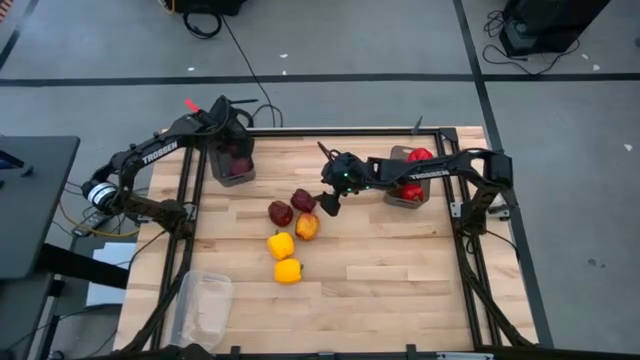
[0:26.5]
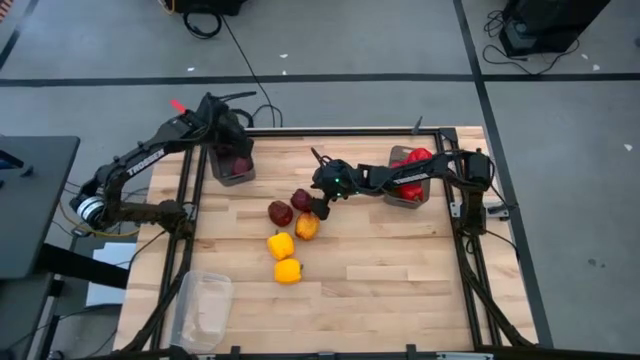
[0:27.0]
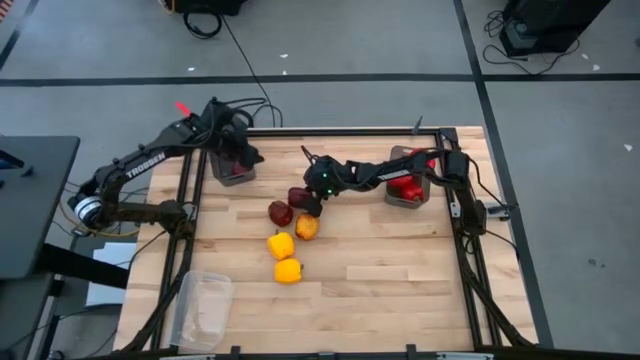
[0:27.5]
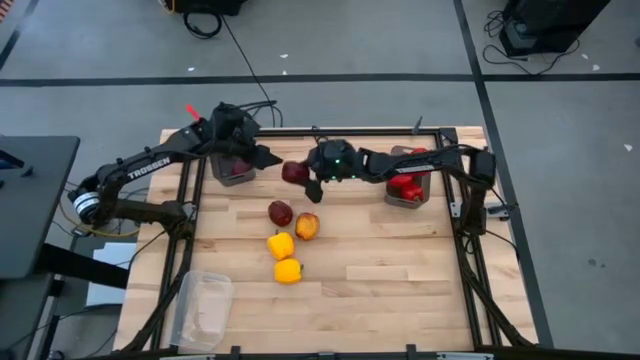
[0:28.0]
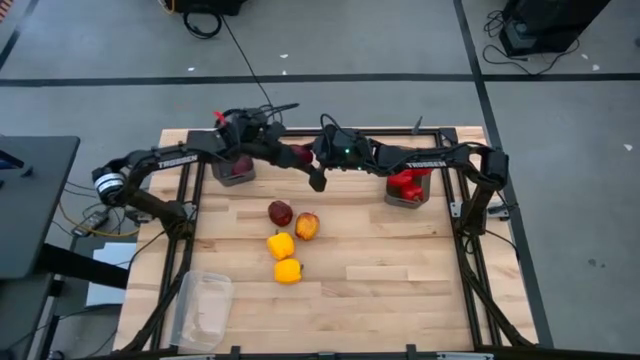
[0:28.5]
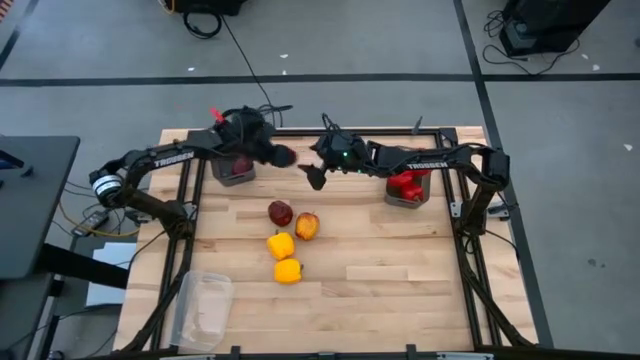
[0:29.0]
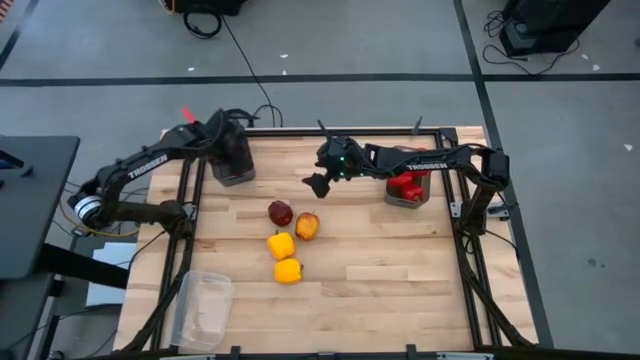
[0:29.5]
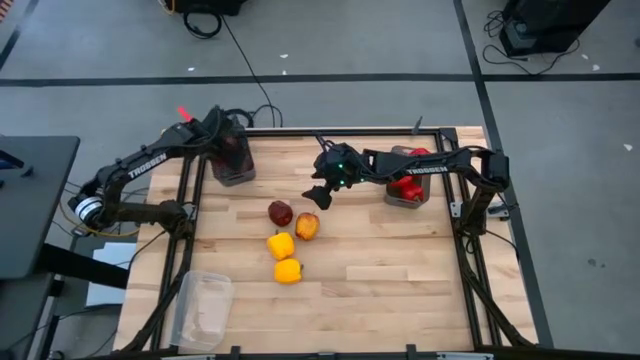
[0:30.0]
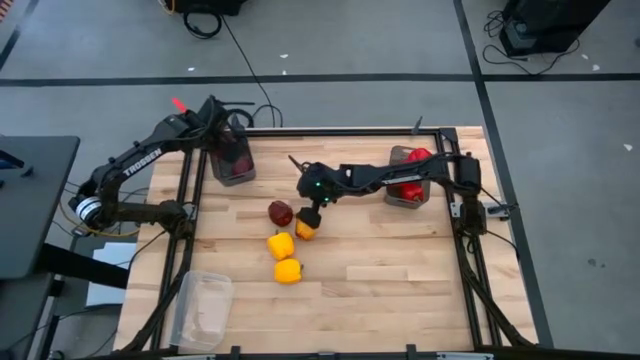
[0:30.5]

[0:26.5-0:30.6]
Task: Sort produce into baskets
Put the red apple into the left black bin

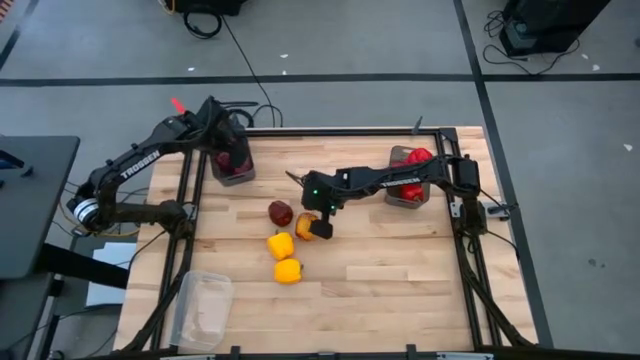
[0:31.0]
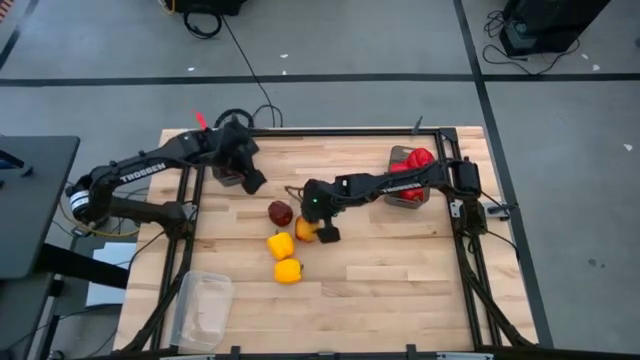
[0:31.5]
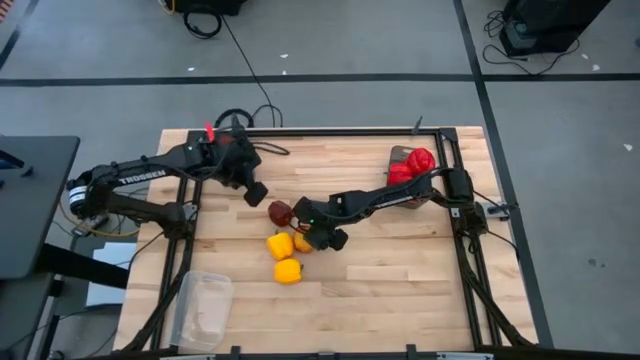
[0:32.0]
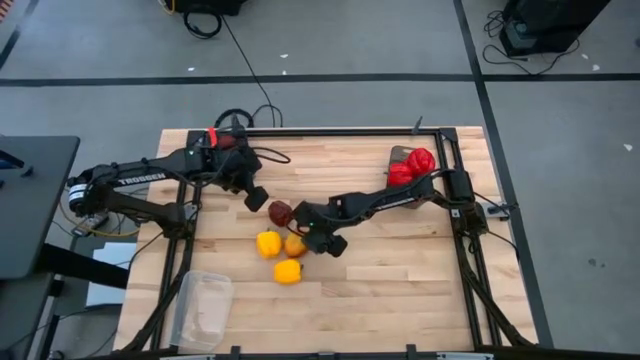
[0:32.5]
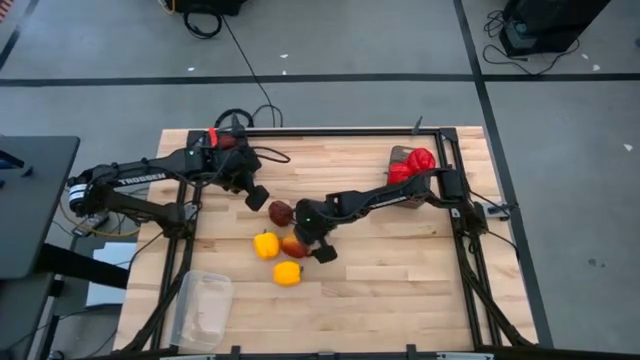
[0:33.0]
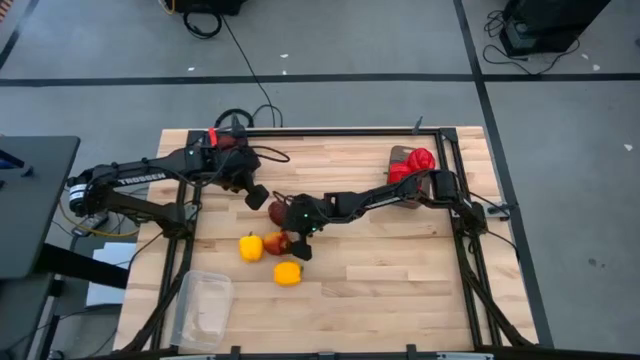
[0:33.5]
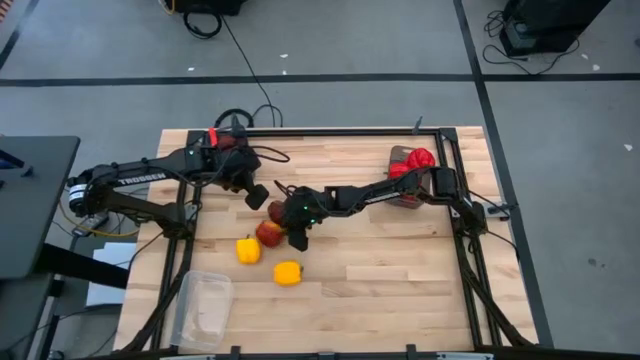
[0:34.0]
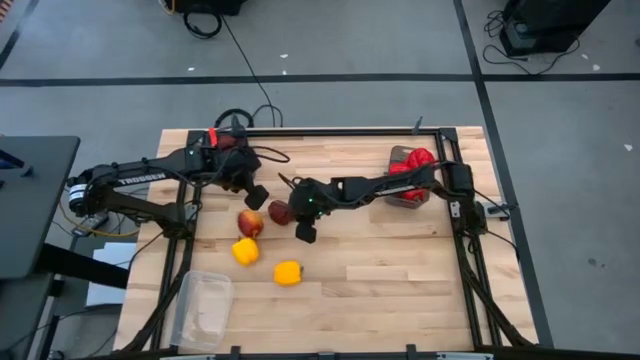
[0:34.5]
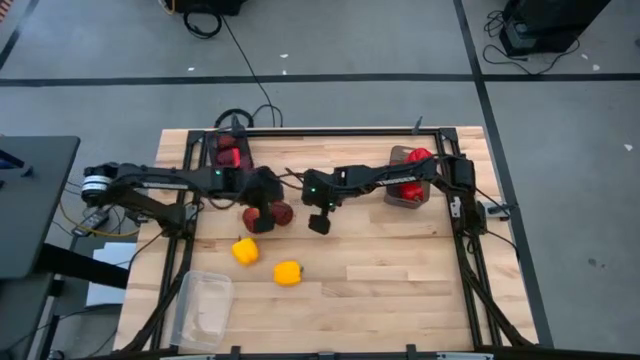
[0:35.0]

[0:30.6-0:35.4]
Put the red apple into the left black bin

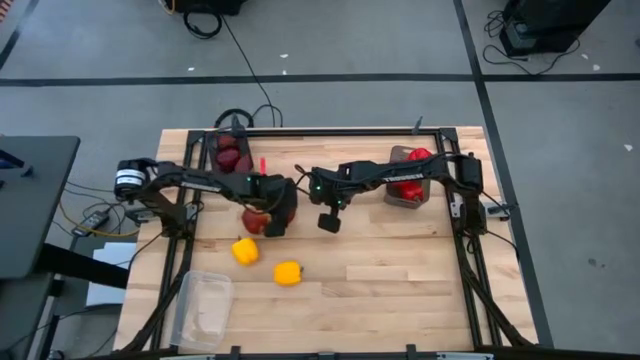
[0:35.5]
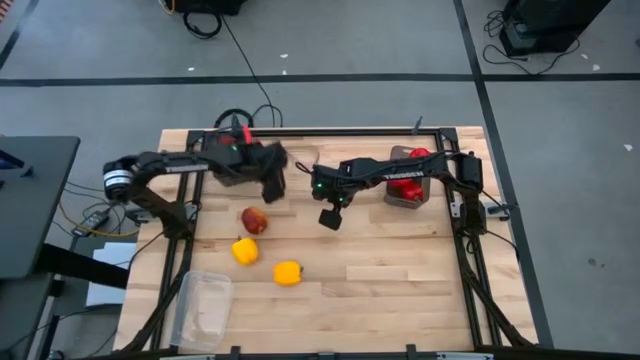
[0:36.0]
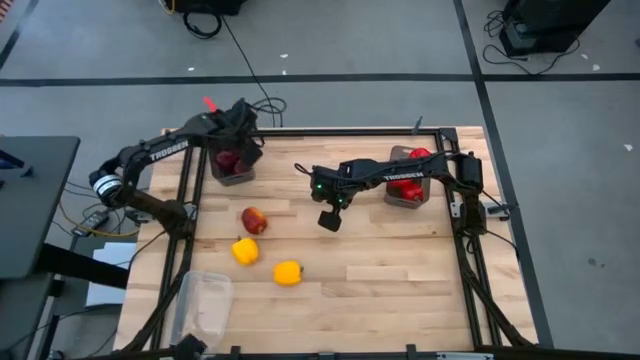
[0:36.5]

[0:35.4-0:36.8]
Put the red apple into the left black bin

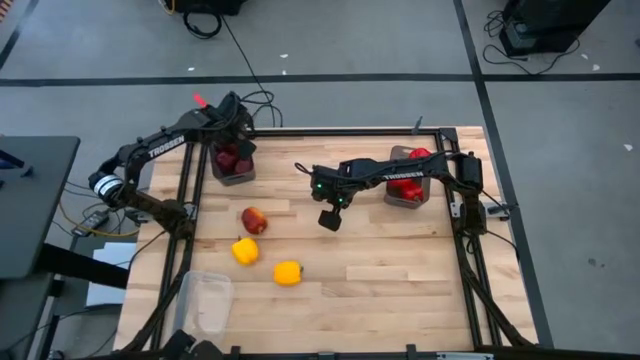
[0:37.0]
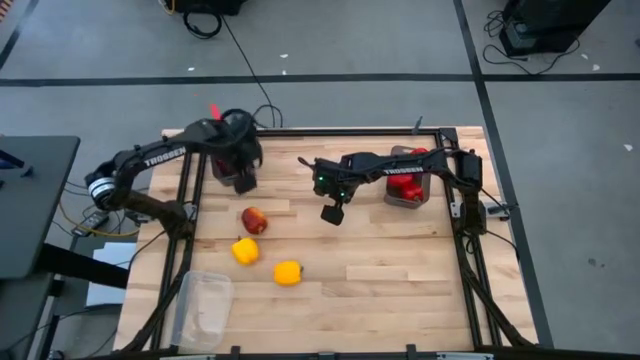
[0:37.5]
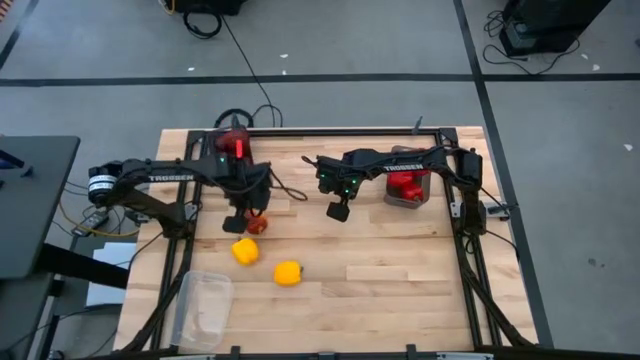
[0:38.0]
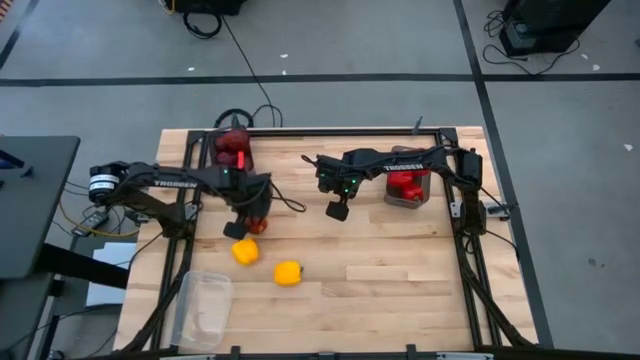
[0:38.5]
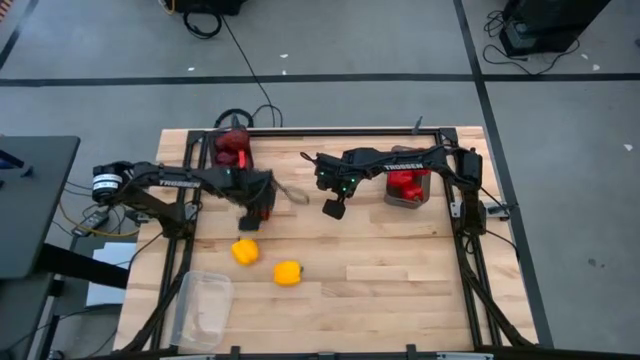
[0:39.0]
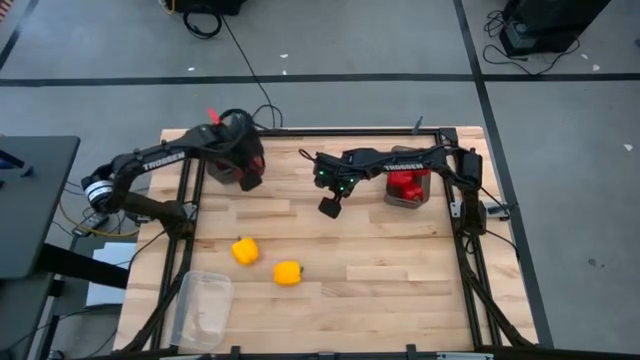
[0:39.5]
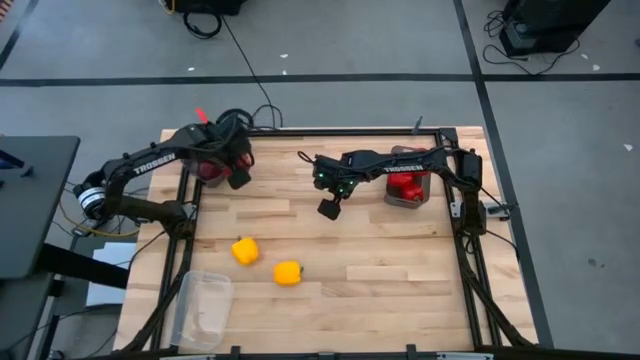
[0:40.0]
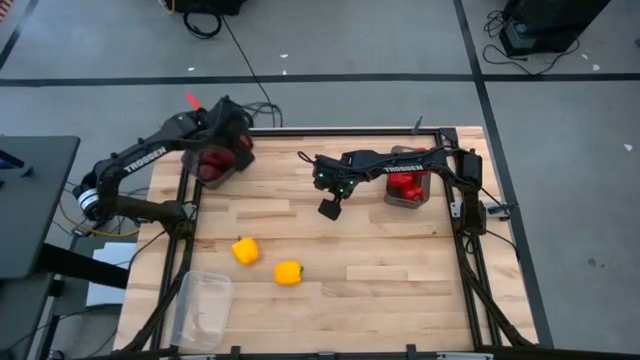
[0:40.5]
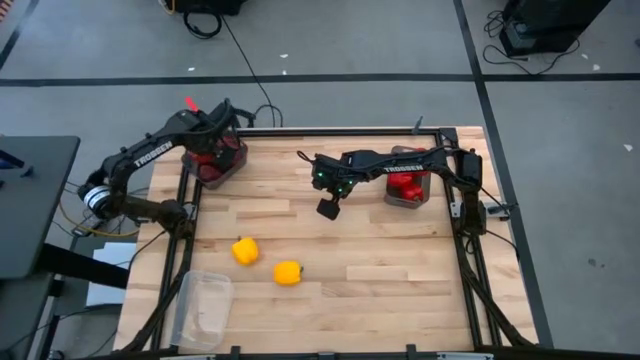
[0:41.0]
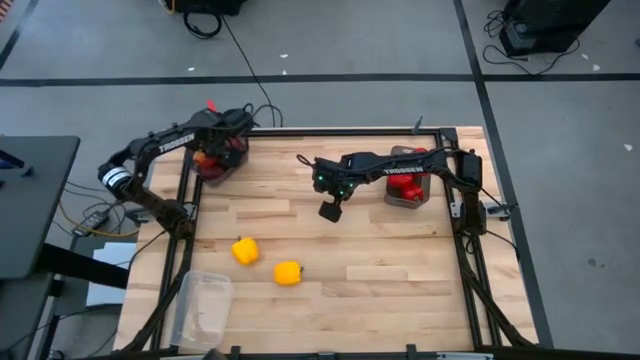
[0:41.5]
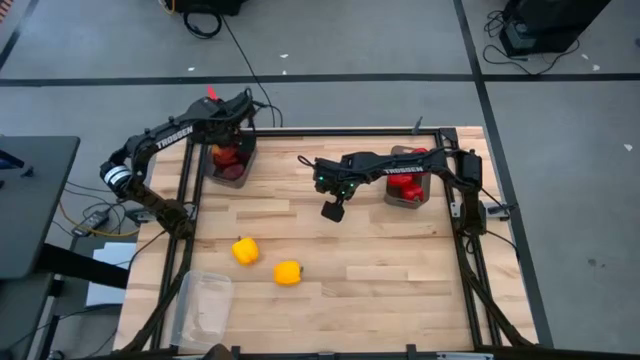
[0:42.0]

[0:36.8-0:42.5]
Put the orange apple into the left black bin

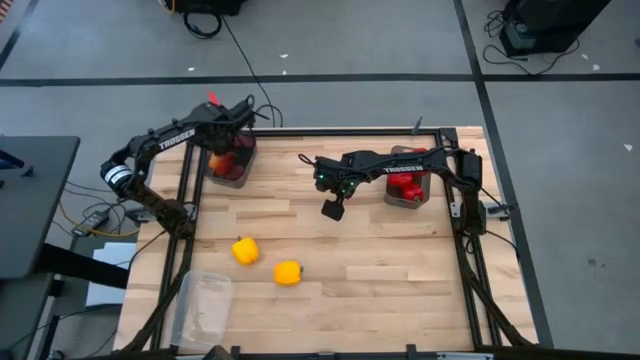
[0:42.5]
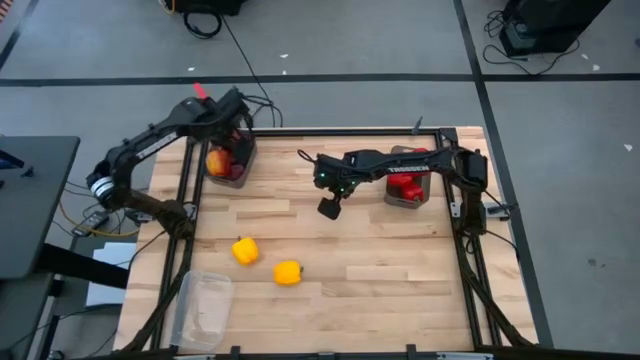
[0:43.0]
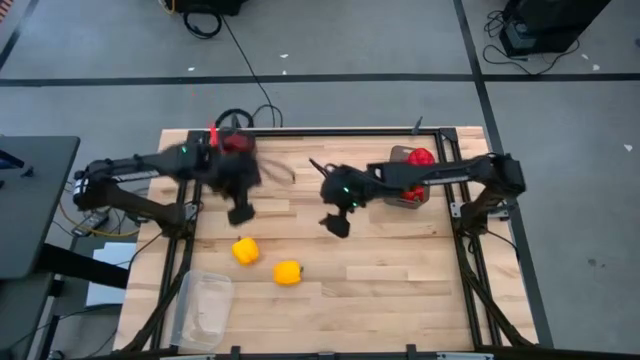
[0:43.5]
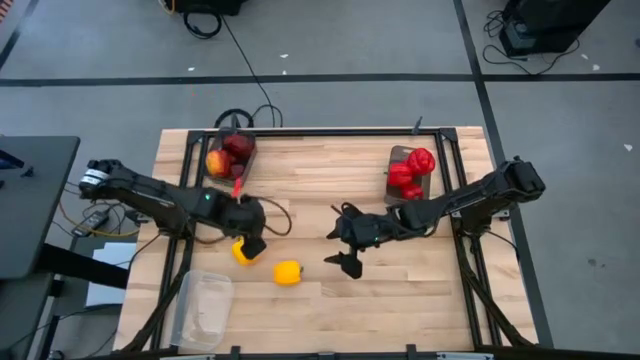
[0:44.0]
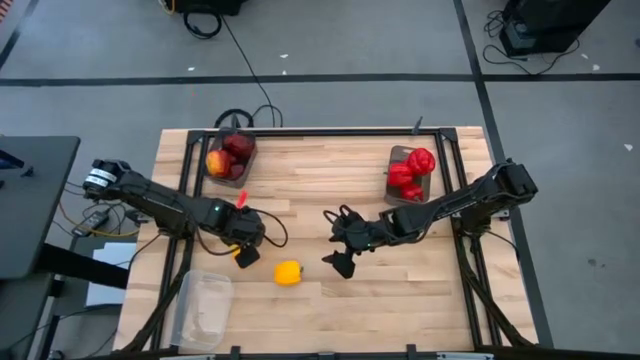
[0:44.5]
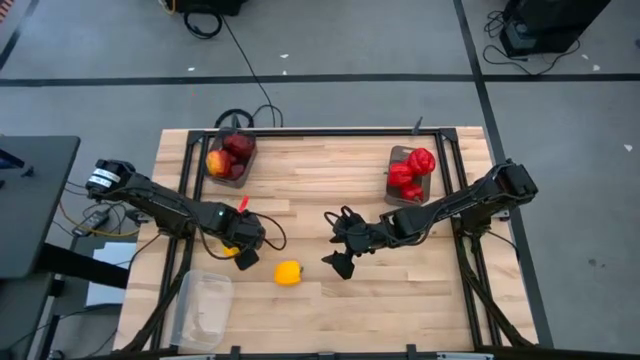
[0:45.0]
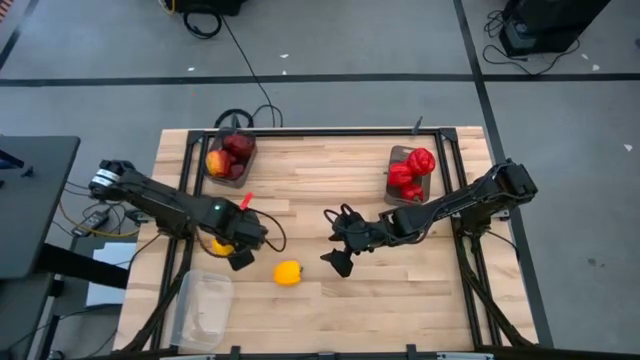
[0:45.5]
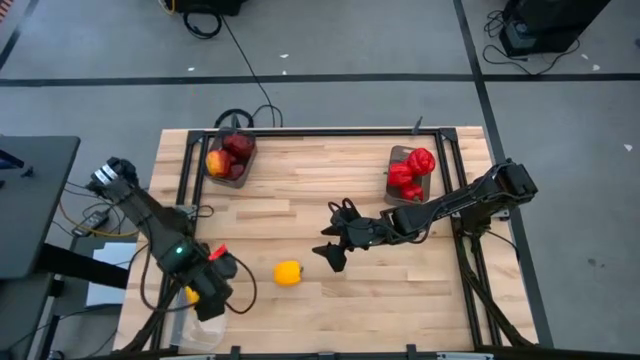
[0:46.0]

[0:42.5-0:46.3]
Put the yellow bell pepper into the transparent bin

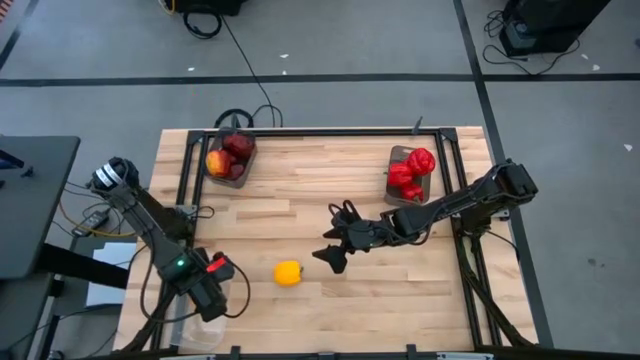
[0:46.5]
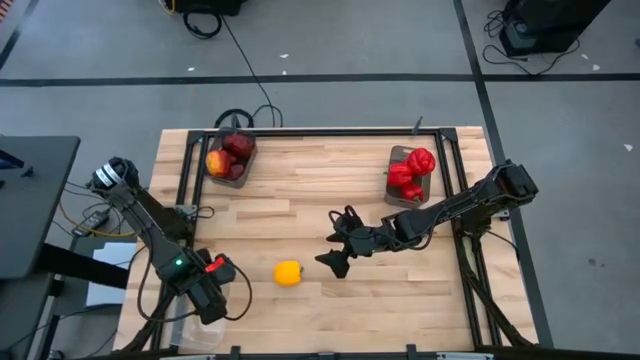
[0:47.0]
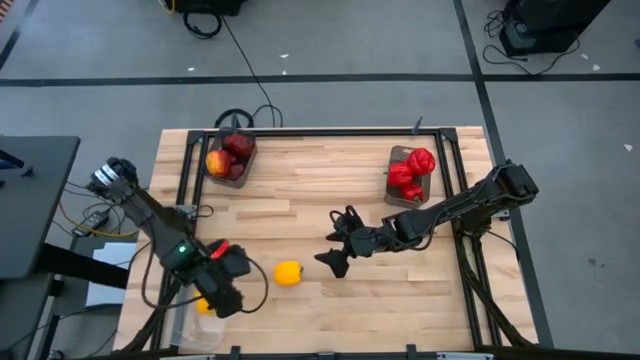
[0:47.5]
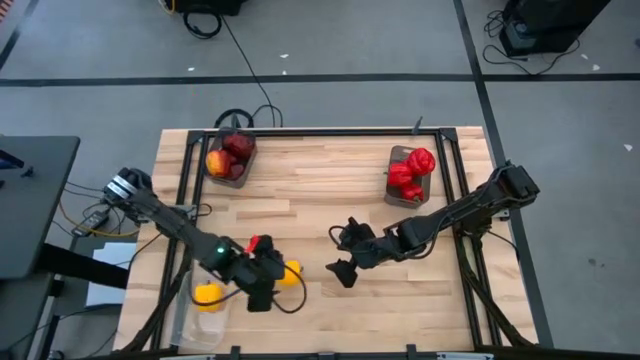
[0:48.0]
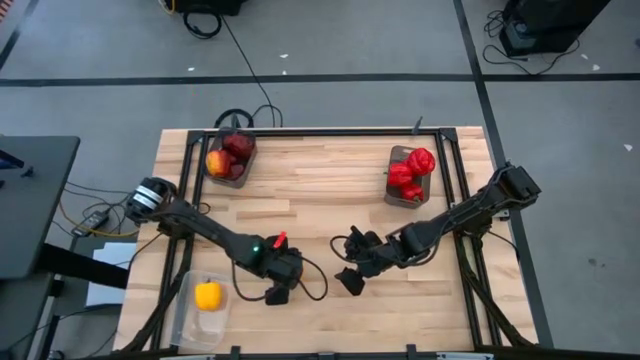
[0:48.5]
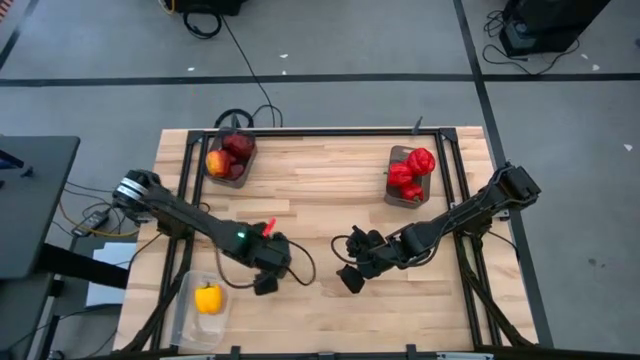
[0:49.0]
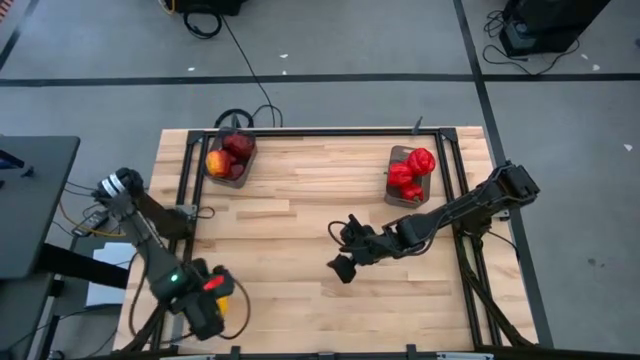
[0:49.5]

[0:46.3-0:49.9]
Put the yellow bell pepper into the transparent bin
